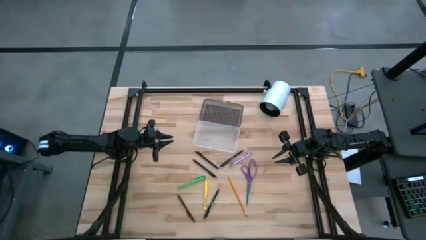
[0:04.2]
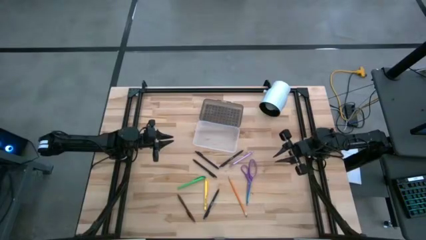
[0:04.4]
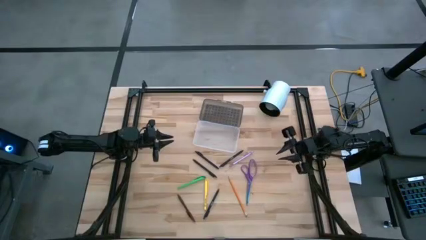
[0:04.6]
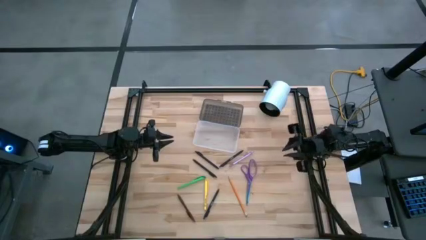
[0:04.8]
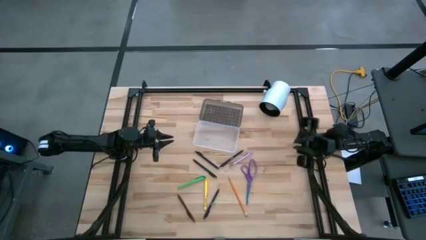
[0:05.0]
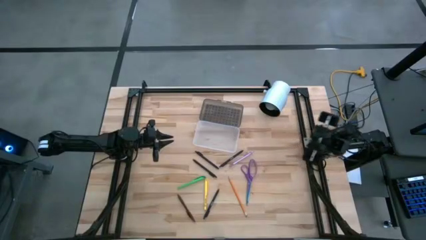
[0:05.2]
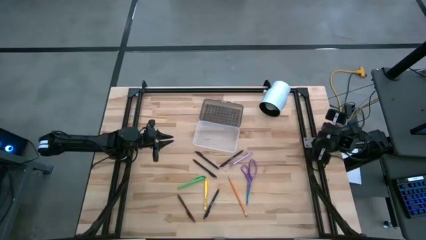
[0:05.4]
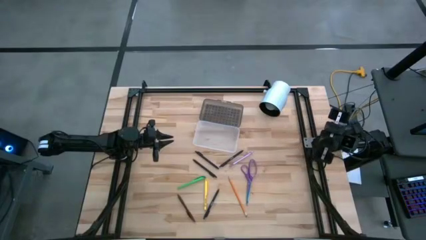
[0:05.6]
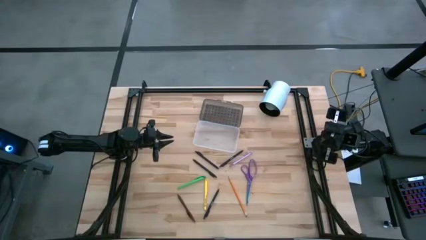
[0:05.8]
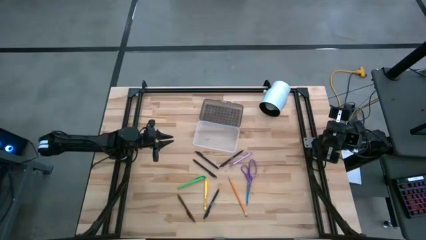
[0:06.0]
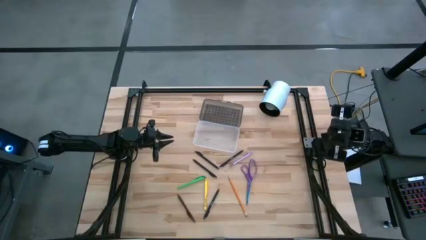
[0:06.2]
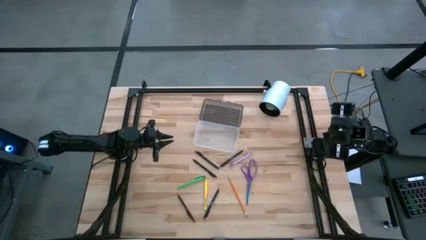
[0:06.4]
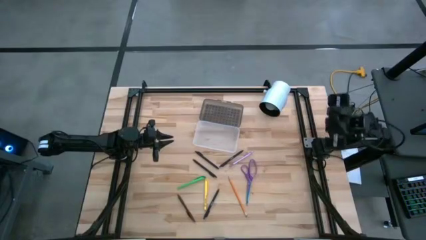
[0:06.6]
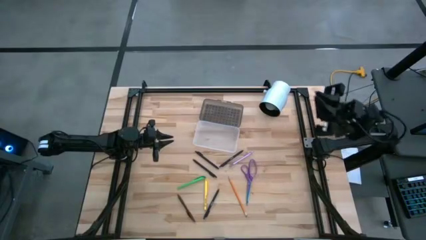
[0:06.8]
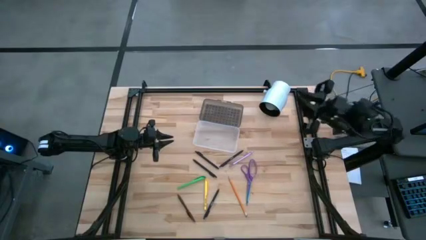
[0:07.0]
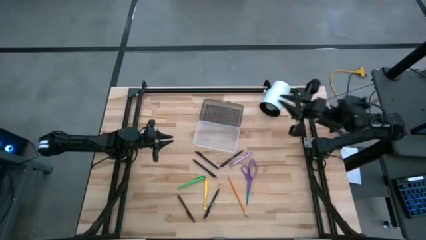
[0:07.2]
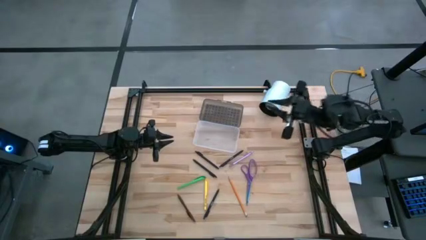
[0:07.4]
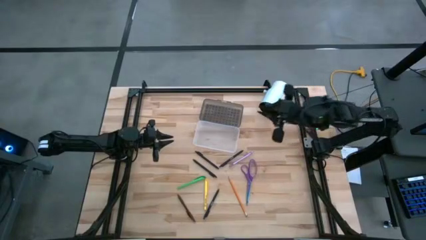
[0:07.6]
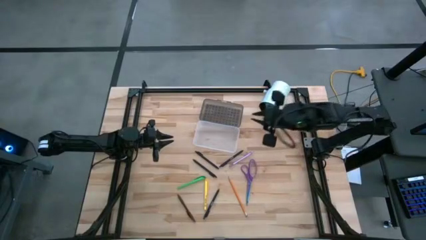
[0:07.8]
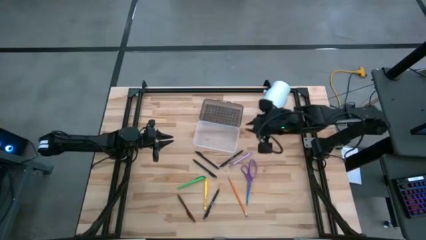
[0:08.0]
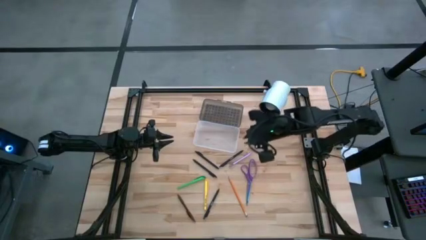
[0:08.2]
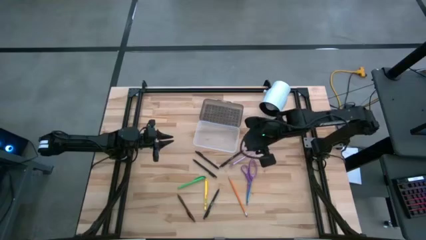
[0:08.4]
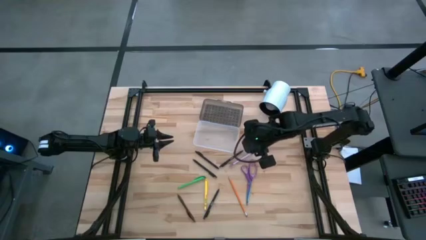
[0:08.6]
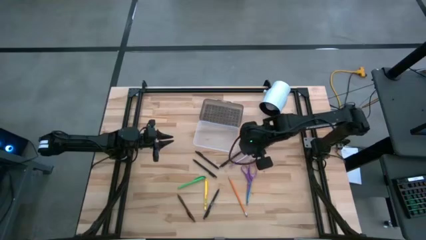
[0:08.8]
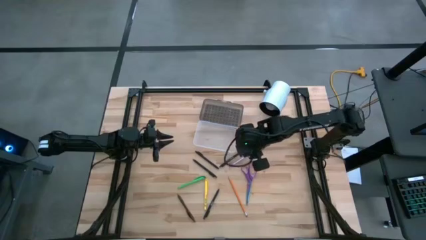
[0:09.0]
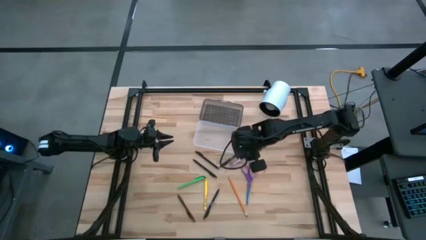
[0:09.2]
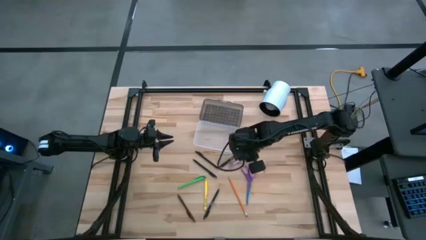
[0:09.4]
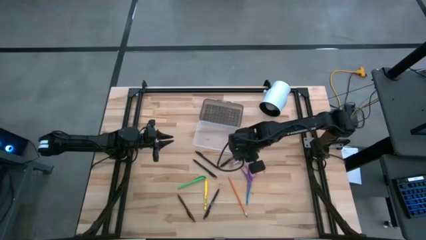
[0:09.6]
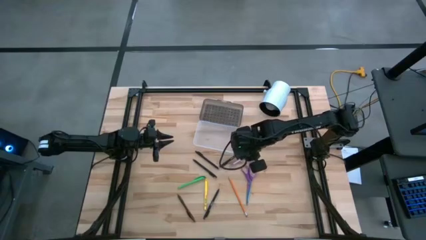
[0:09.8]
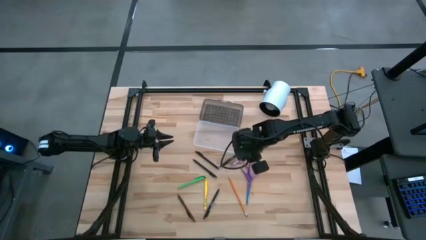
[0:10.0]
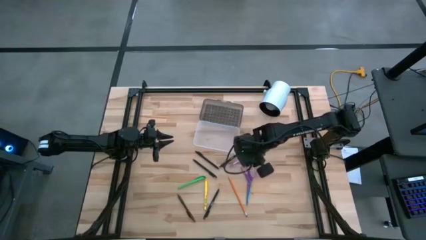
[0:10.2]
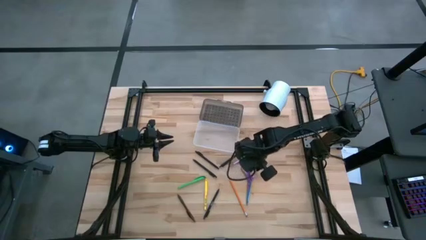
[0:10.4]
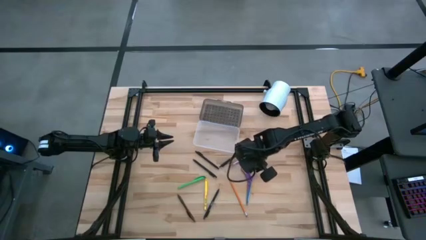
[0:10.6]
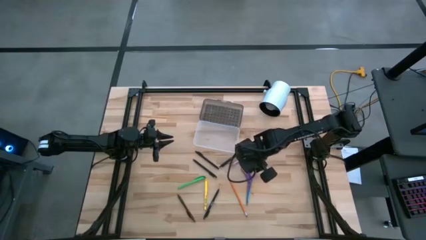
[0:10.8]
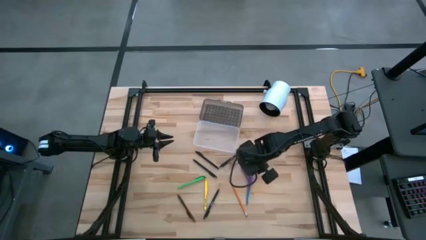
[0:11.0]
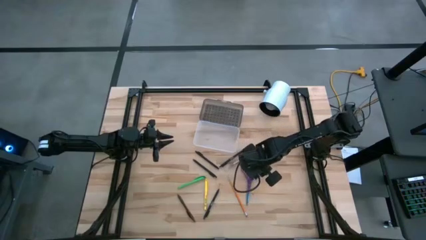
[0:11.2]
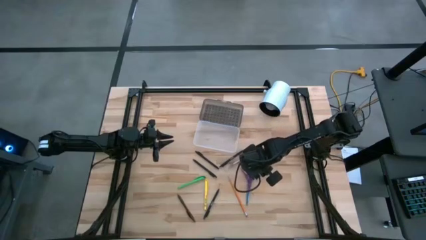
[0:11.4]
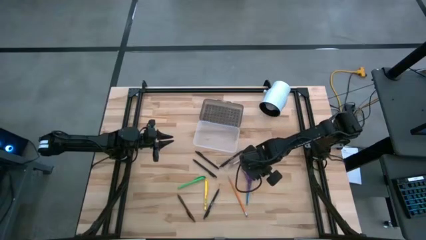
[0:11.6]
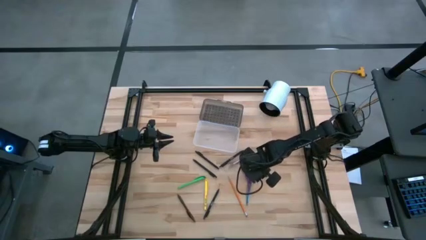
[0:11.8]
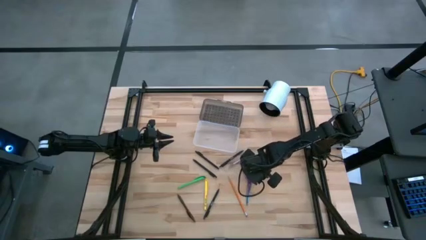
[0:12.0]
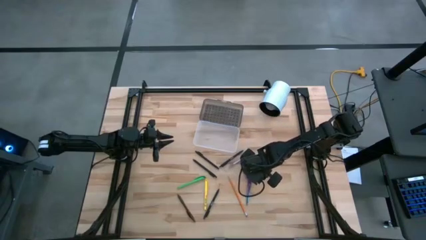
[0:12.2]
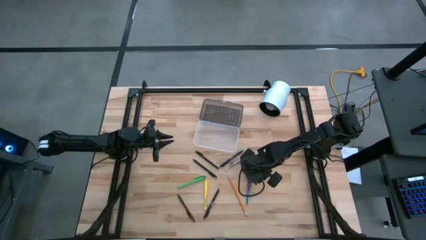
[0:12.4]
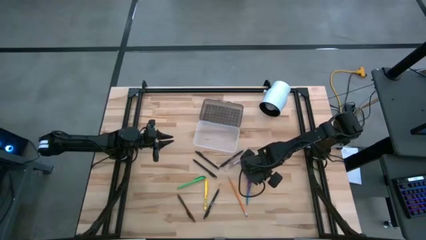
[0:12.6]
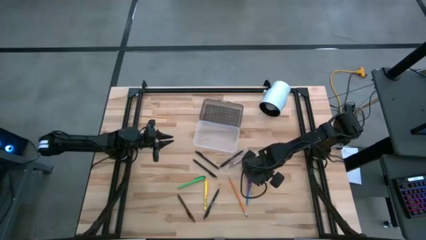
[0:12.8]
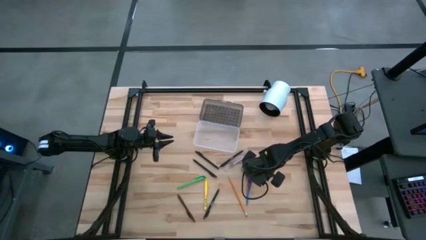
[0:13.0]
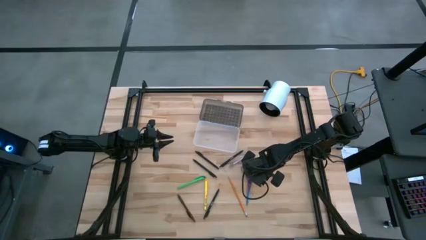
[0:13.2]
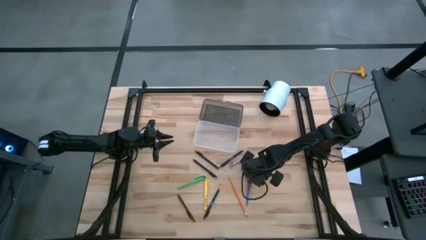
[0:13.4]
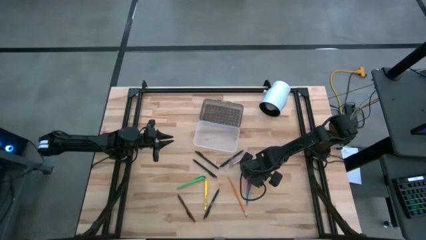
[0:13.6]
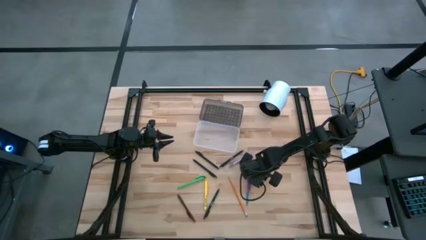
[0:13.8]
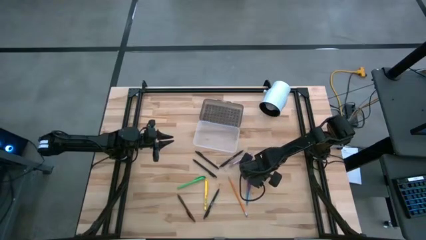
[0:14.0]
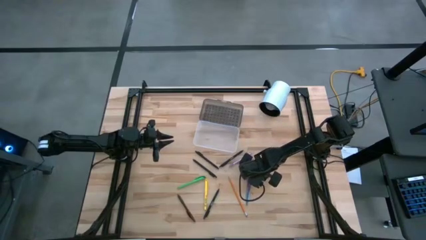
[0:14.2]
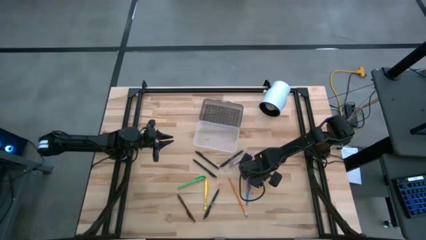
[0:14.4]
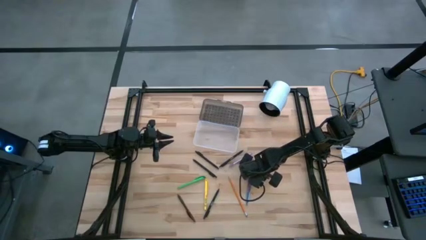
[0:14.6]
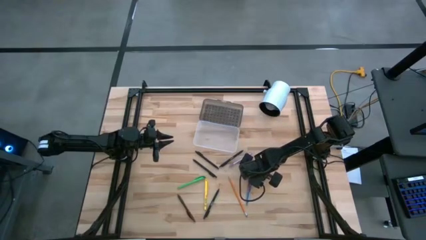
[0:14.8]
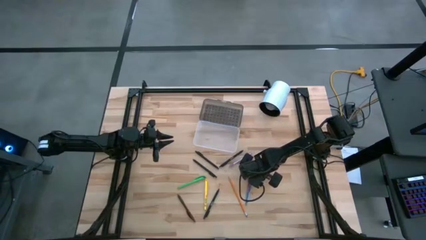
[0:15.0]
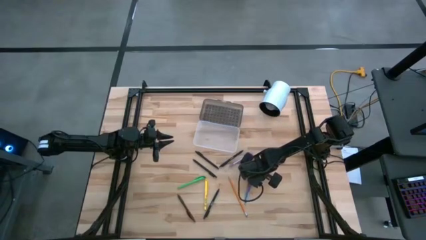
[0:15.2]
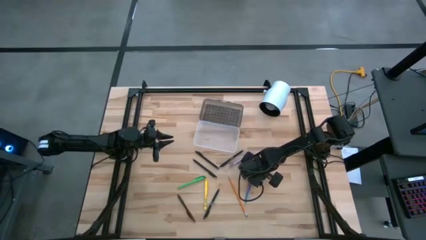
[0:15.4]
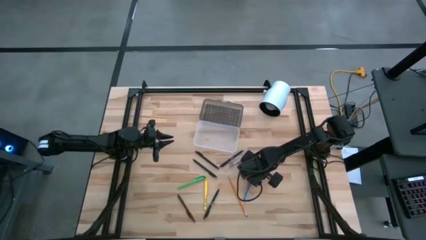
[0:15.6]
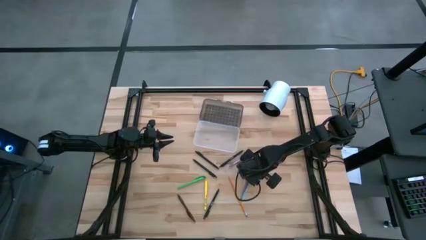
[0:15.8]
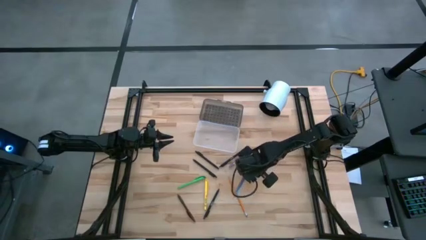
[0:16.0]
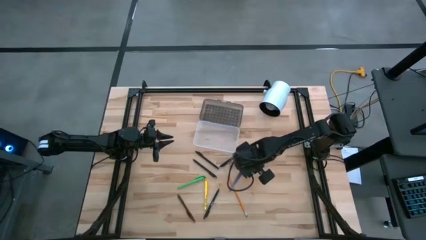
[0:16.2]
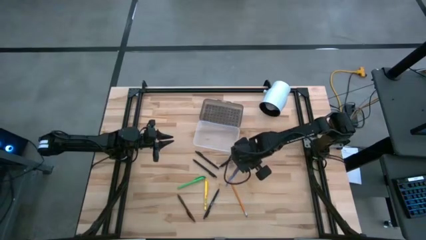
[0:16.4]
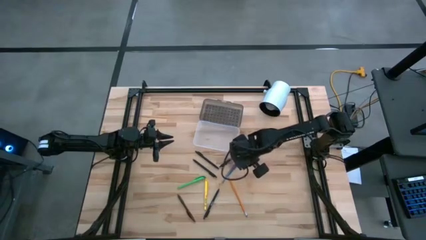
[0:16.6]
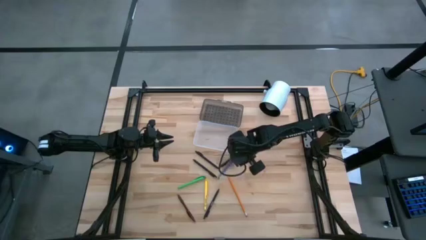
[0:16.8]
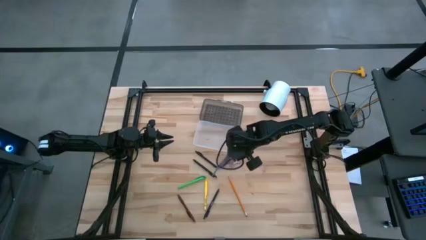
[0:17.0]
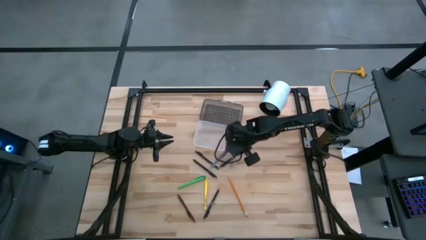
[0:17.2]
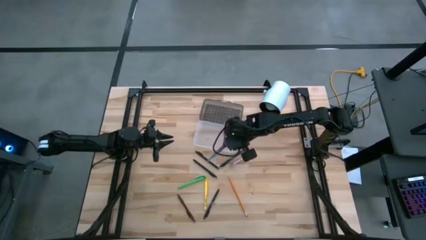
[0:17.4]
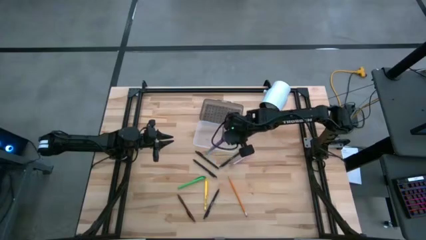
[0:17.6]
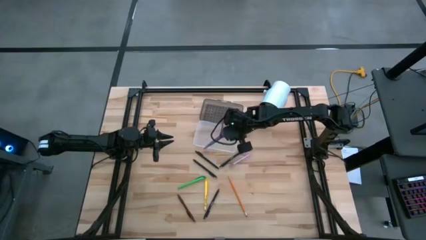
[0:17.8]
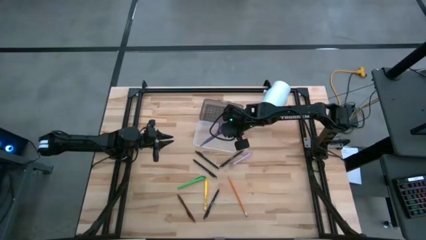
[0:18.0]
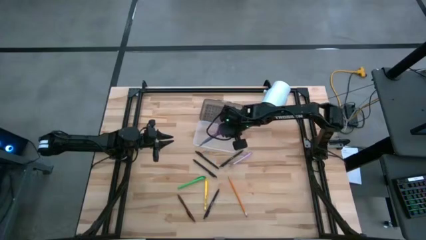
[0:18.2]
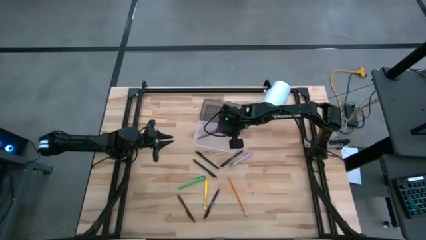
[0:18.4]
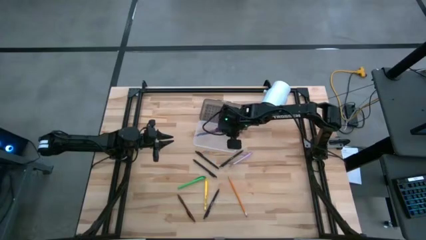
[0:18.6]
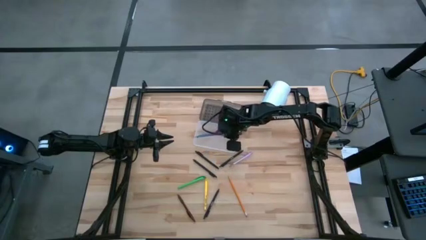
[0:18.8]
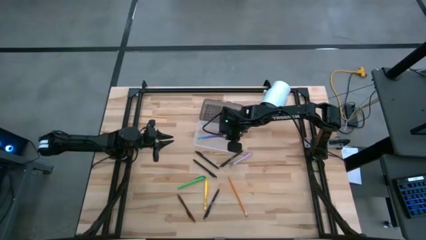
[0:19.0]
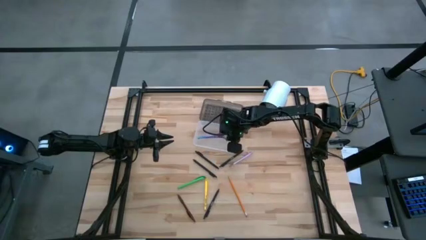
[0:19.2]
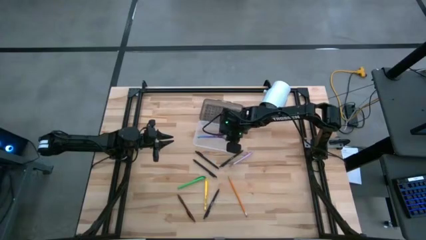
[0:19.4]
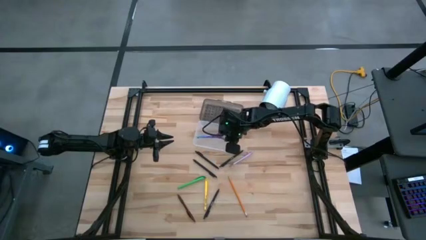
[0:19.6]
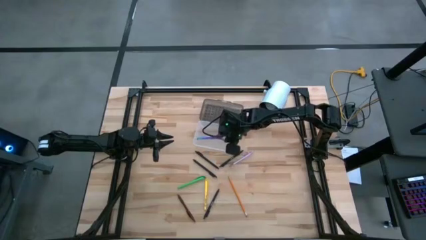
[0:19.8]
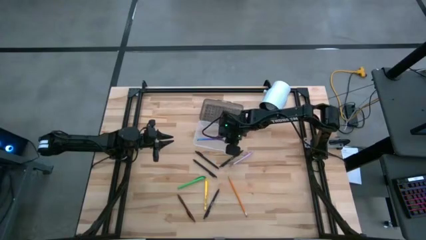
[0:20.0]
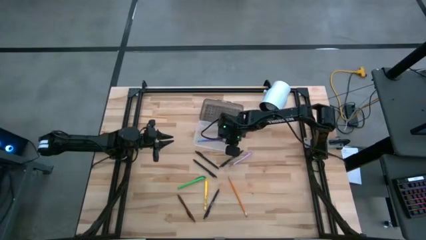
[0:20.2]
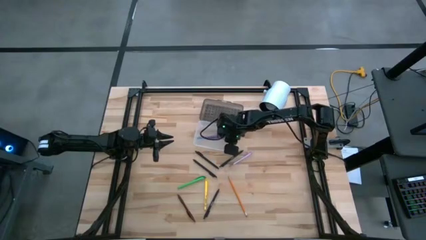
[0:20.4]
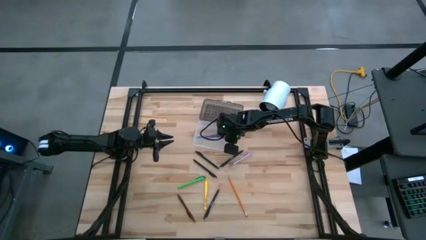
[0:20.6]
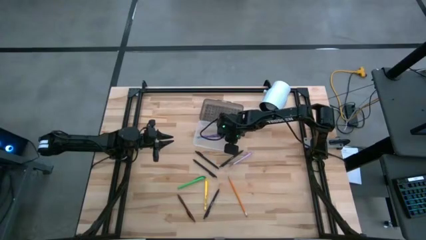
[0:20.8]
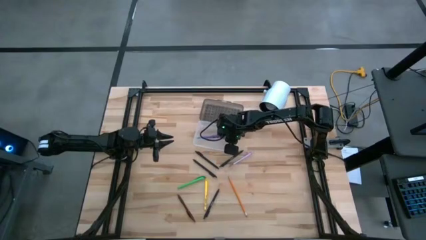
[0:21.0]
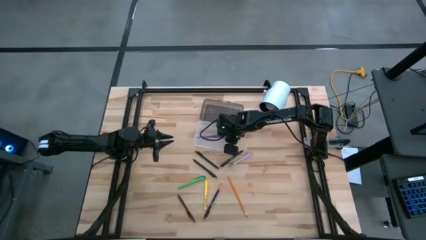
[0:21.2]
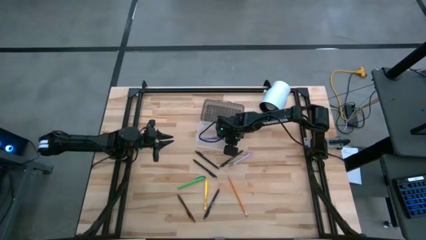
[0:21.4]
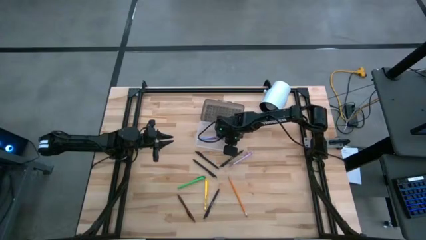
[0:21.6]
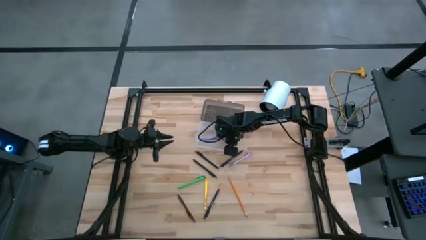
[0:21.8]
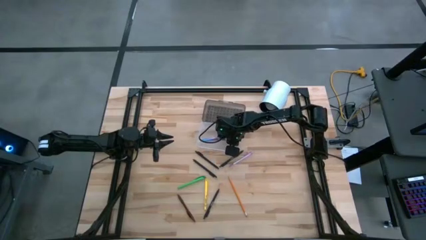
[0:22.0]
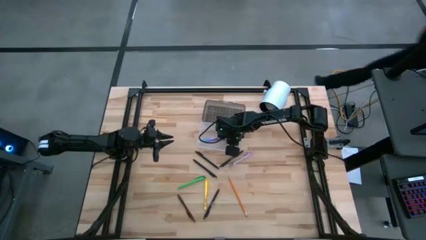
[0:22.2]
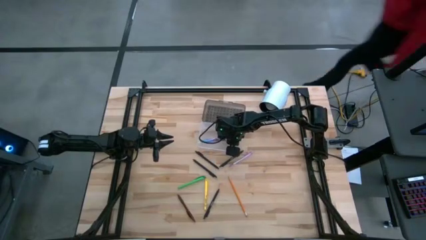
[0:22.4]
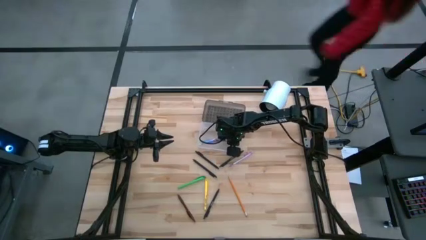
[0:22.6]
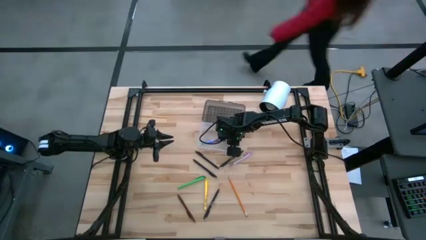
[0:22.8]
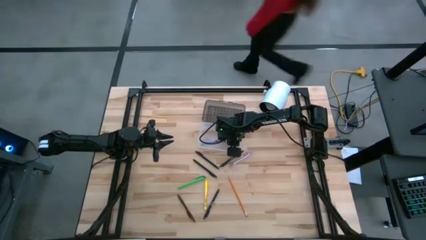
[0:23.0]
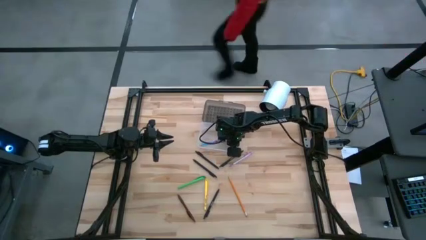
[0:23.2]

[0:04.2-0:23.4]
Task: Pick & place school supplies into a supply box
Put the purple scissors into the supply box
